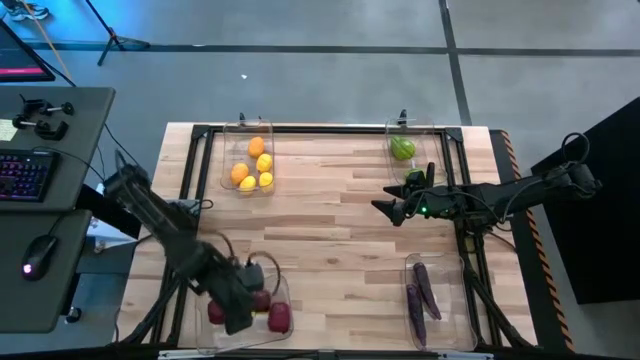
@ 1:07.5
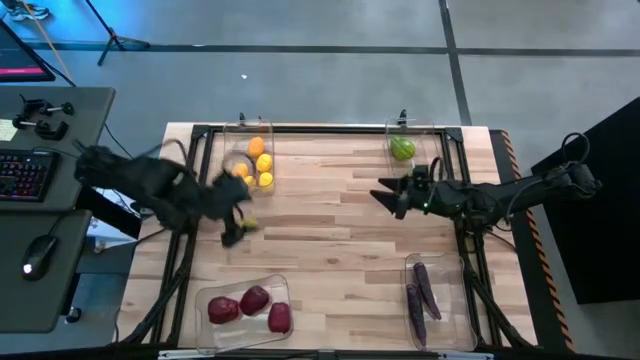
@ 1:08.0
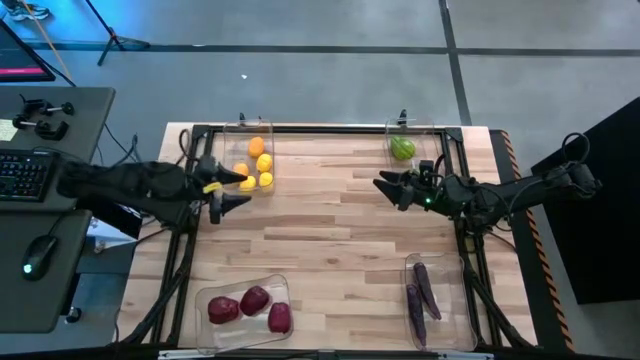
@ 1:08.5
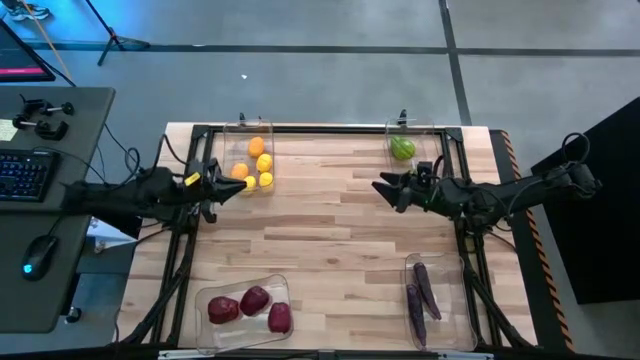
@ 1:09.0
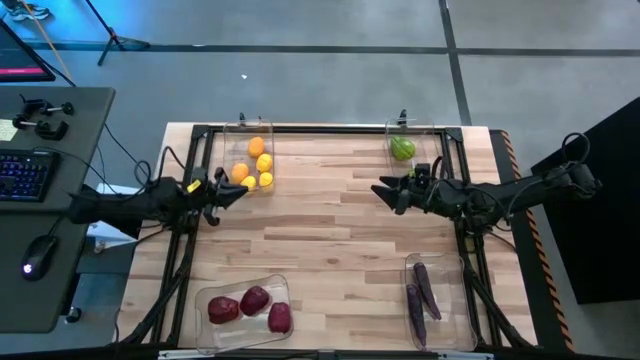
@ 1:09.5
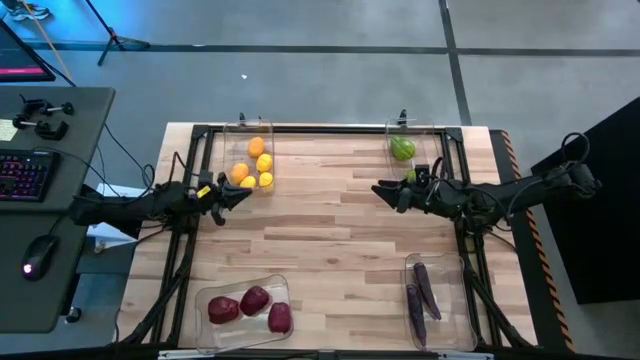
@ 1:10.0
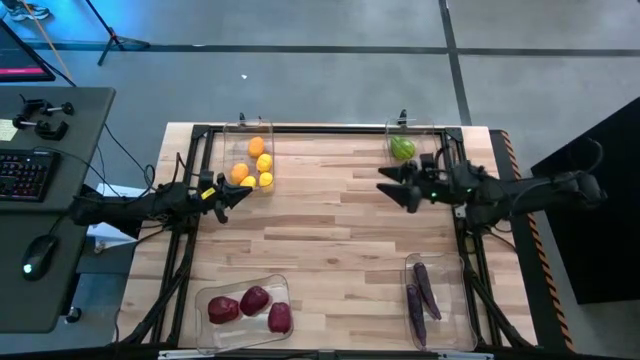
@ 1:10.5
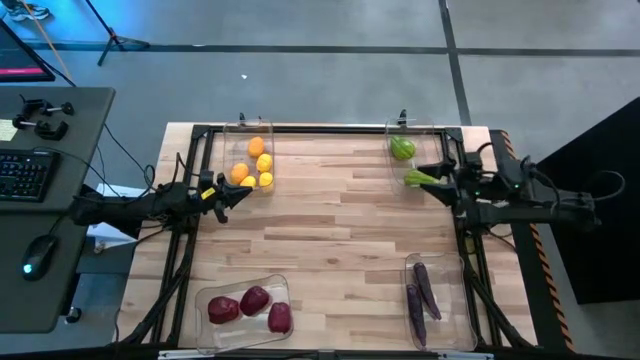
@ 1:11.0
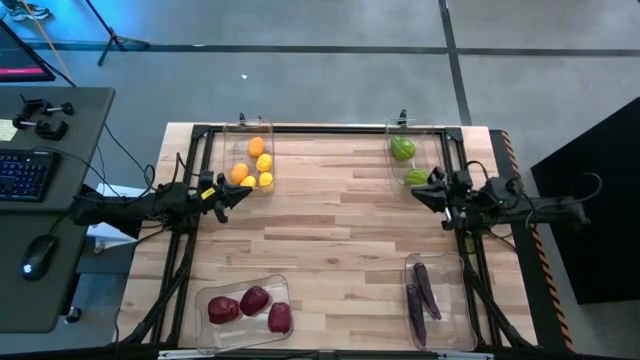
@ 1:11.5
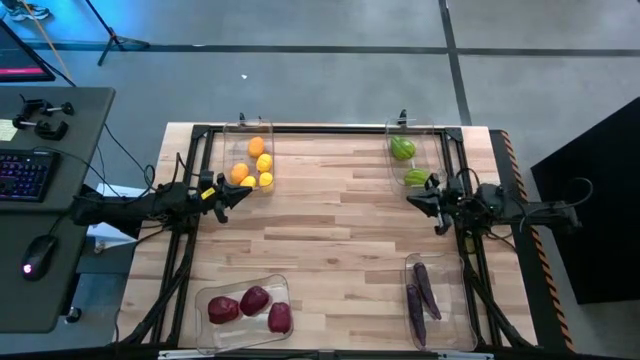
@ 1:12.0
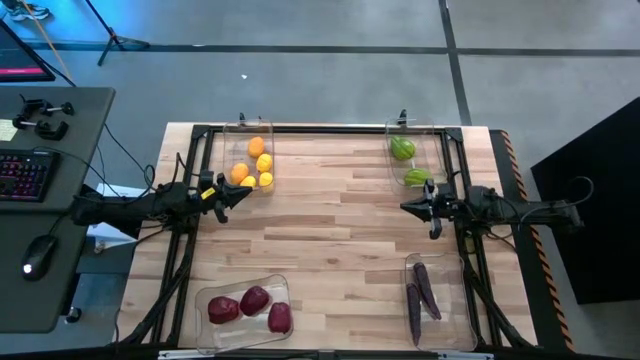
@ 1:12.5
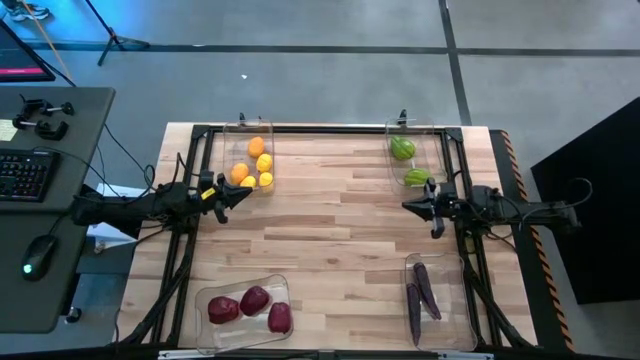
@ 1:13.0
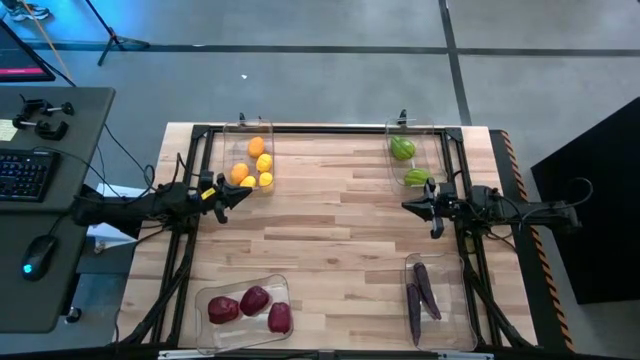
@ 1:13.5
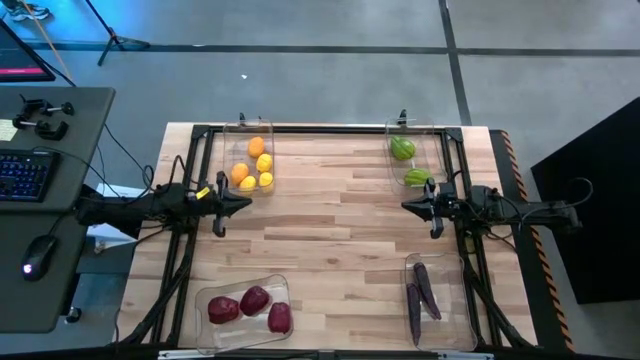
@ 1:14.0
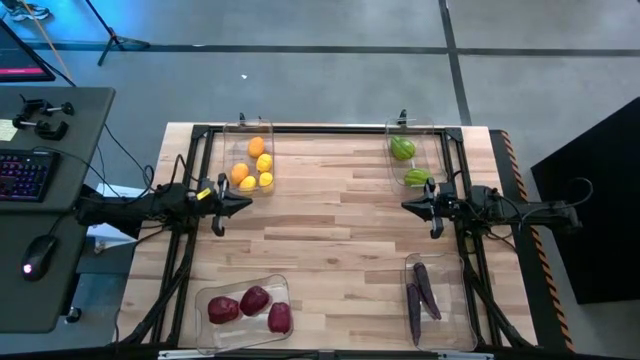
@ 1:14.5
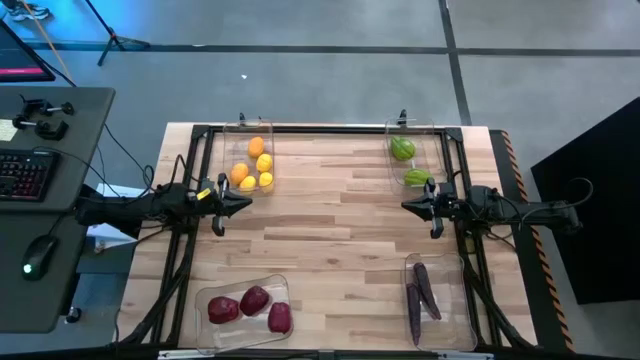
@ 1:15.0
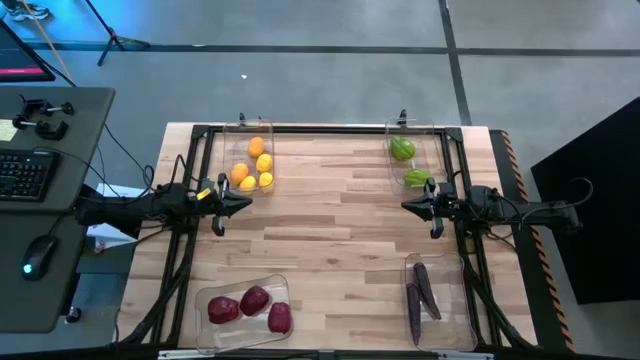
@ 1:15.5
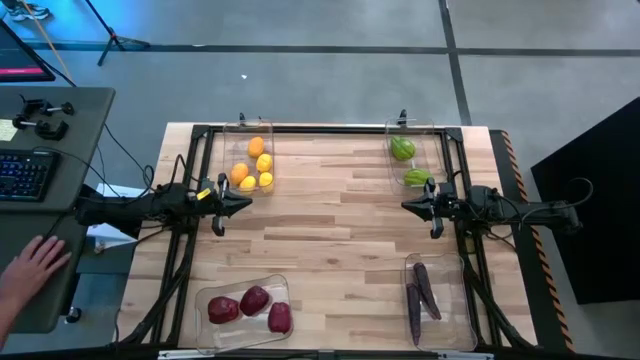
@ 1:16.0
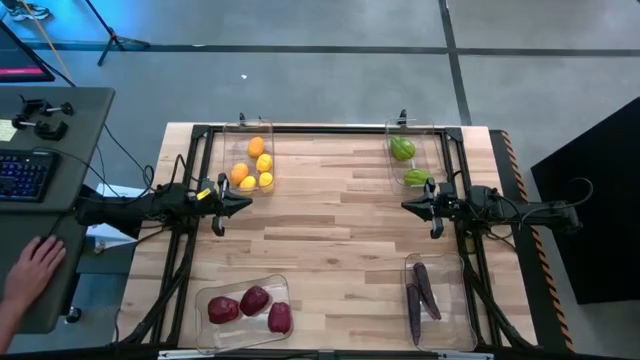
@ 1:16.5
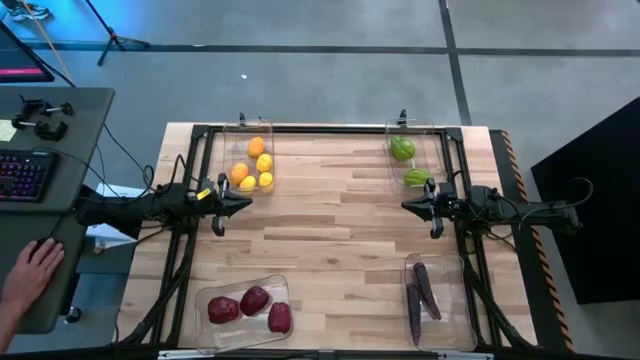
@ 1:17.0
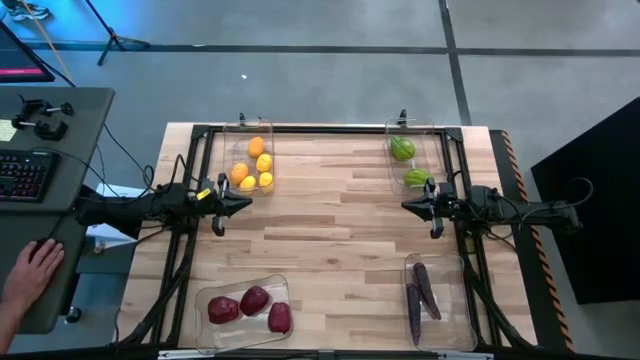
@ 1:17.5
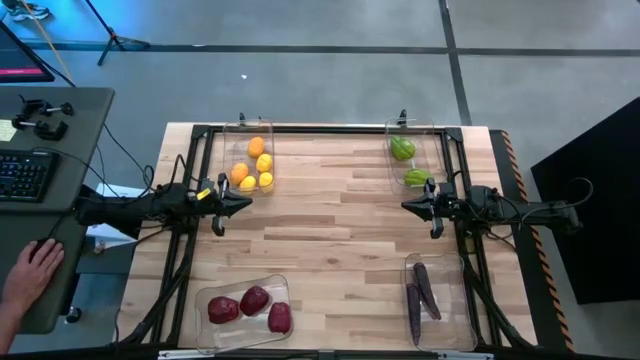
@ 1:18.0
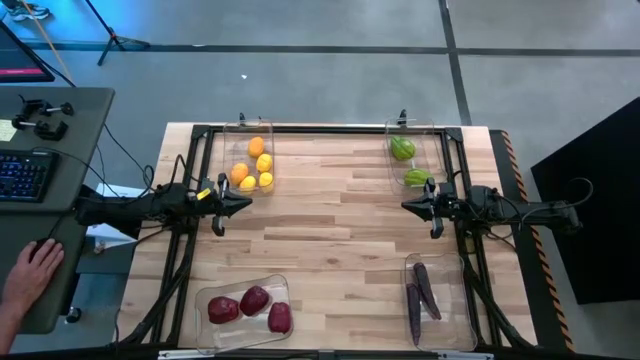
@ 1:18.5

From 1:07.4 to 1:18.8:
Task: Sort produce into baskets
Return to Home Position

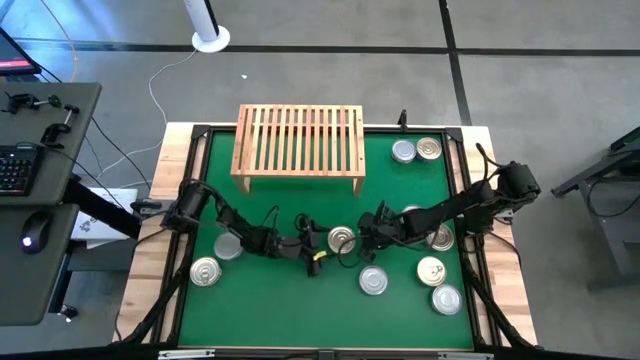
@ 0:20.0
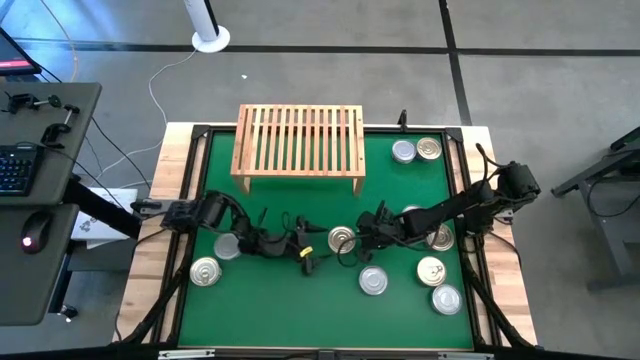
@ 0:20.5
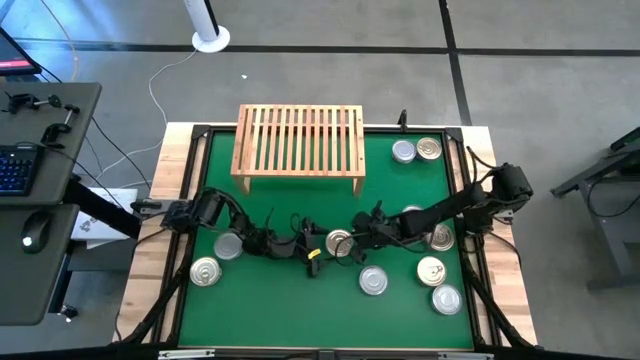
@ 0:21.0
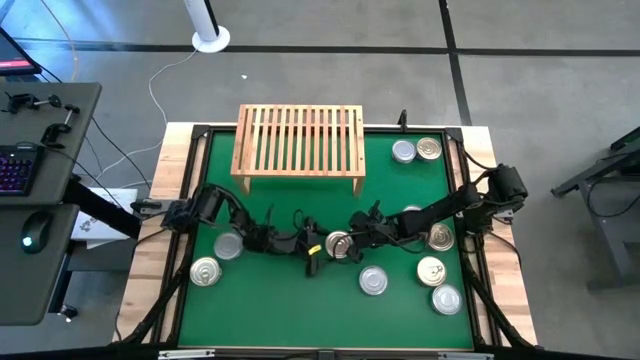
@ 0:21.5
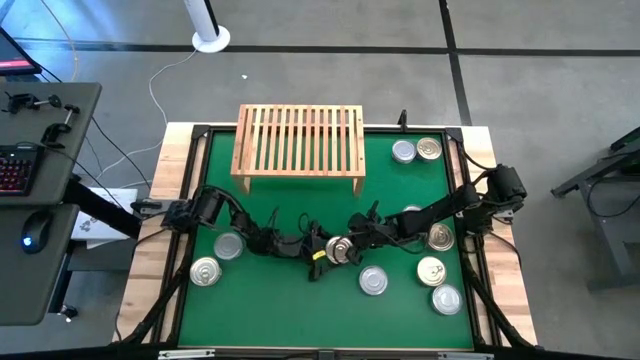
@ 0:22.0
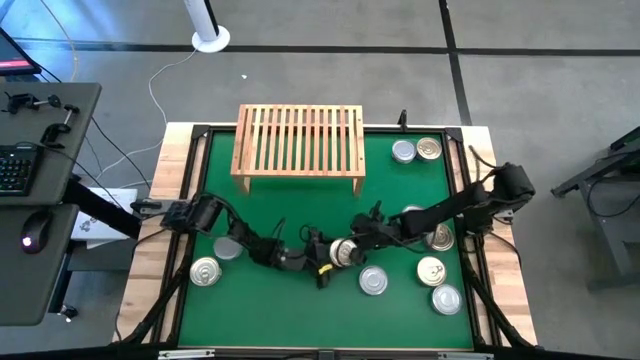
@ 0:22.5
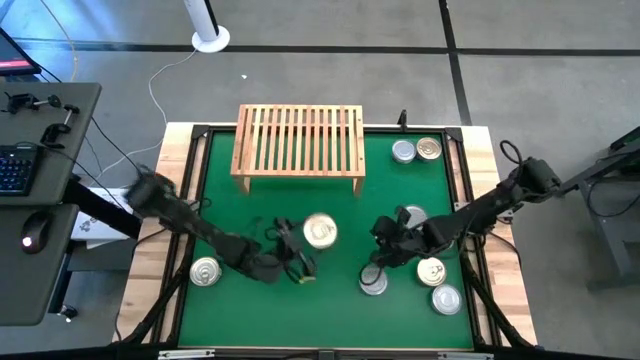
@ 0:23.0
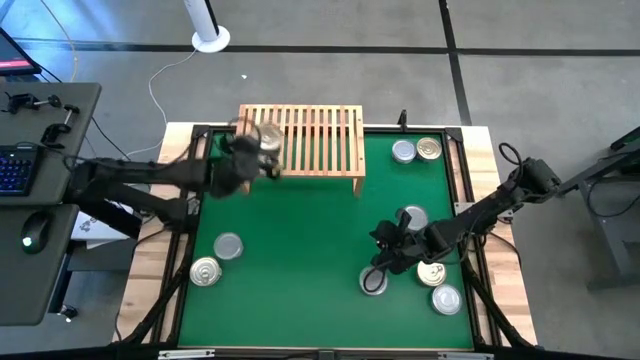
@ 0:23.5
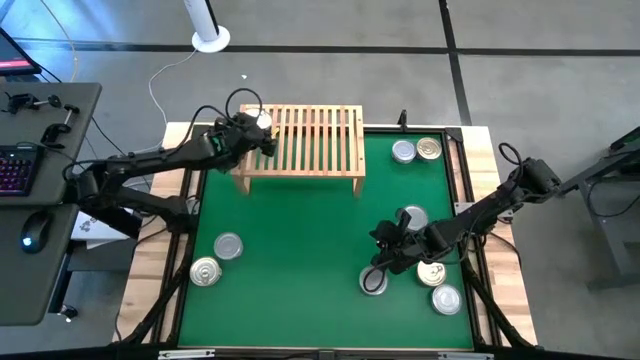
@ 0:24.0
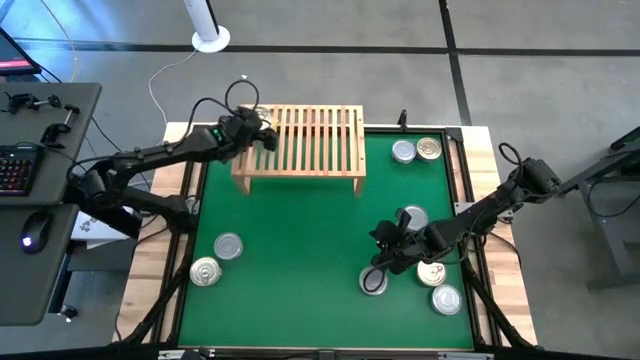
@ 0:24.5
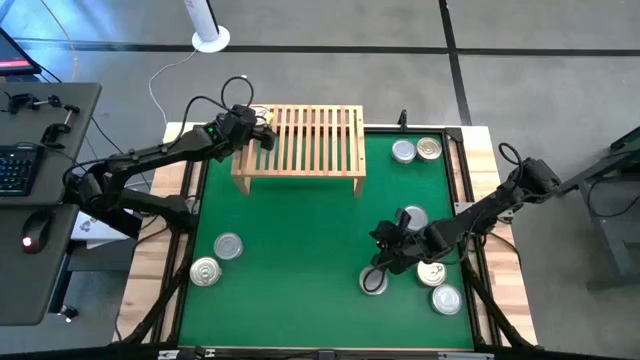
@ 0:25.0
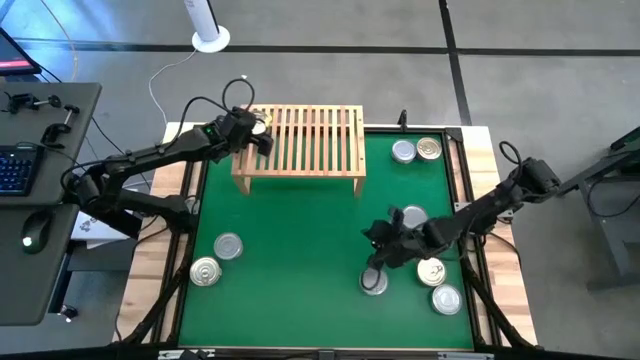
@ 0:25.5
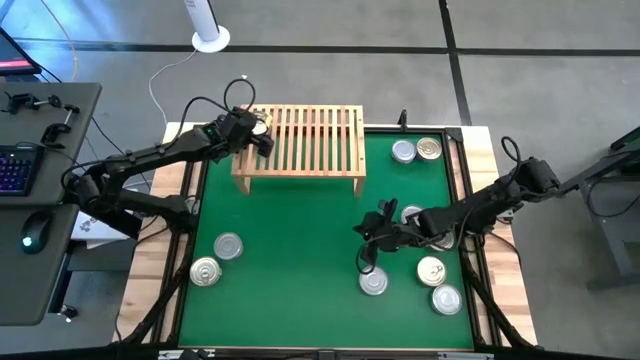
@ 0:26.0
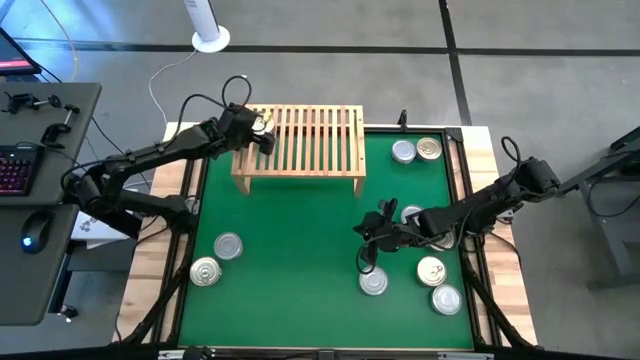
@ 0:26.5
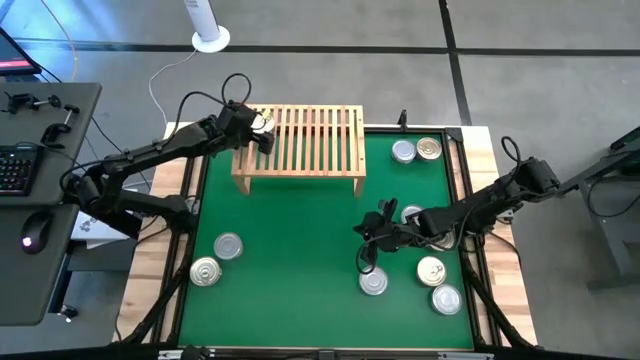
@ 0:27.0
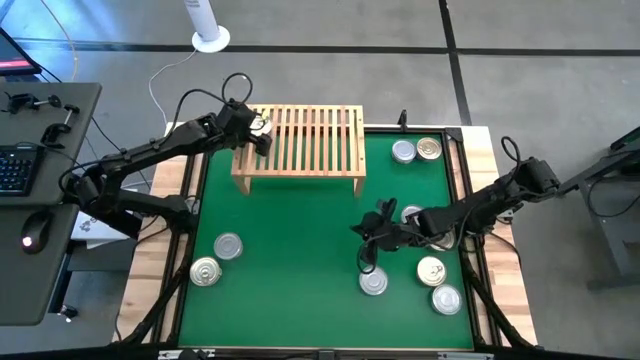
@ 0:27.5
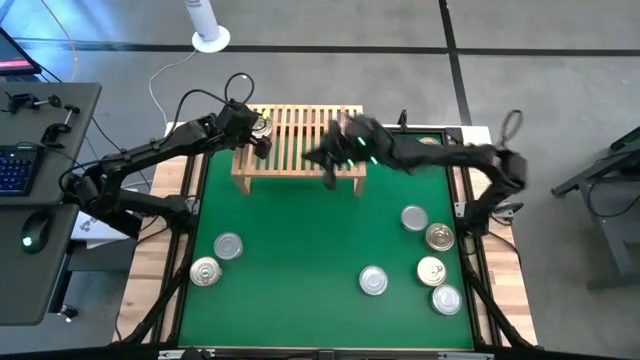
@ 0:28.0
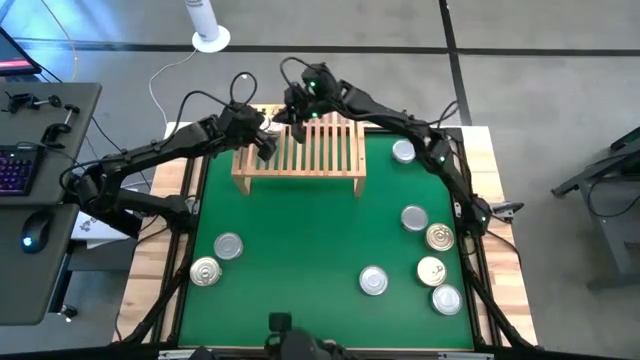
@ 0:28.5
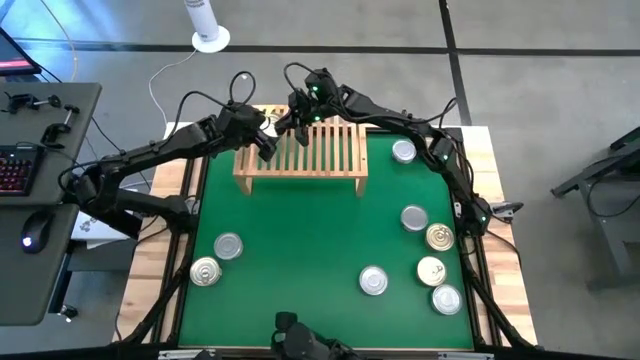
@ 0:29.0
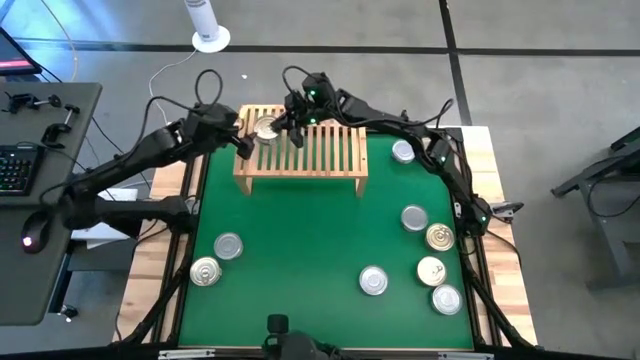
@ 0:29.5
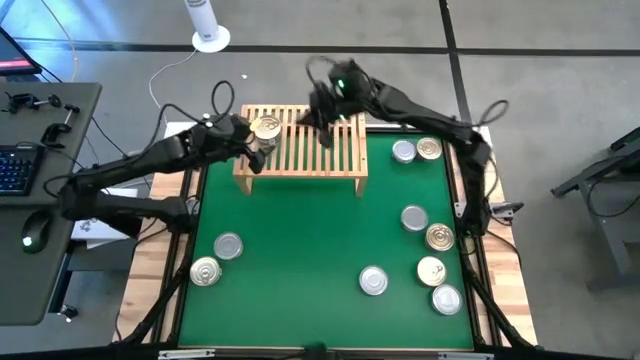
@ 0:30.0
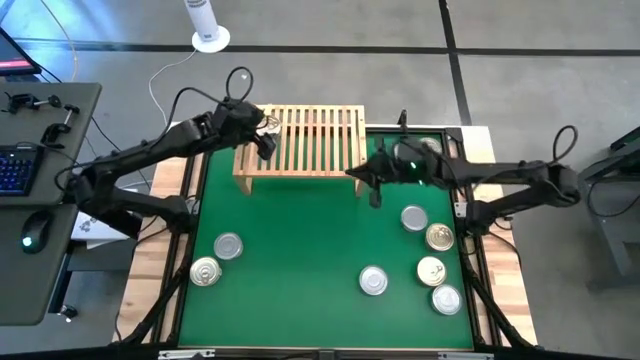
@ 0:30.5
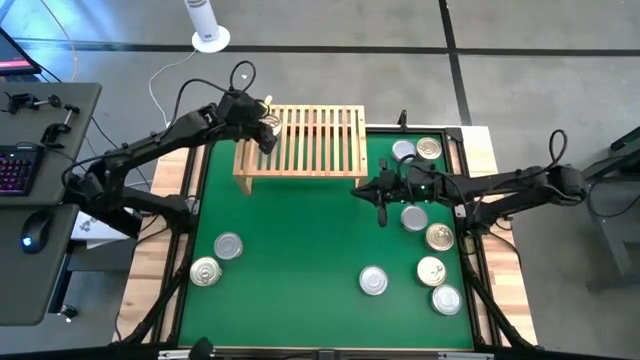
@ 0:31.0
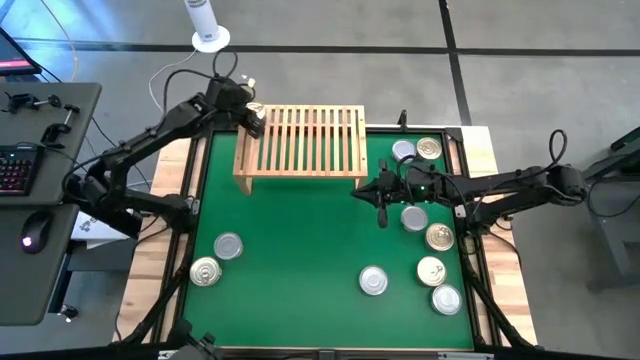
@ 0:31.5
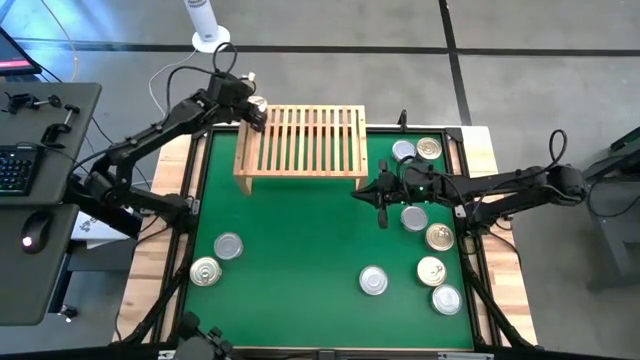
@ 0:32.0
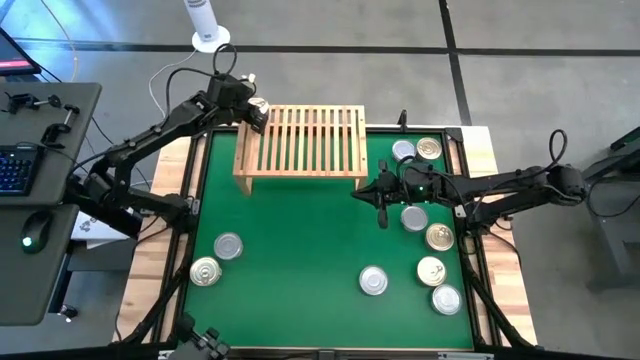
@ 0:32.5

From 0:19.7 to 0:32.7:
Task: Stack canned seafood by type on shelf
Put the blue pink tuna can on the shelf
